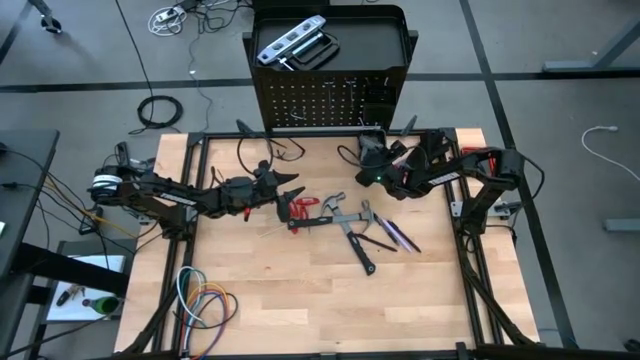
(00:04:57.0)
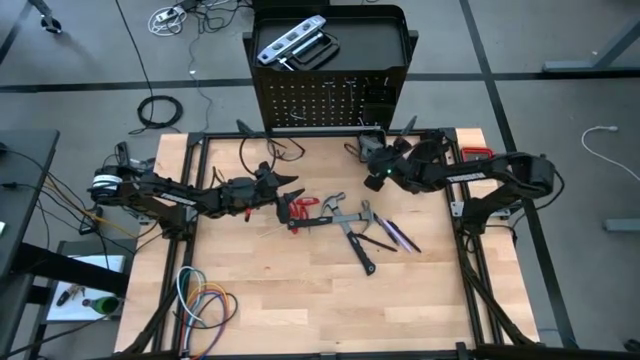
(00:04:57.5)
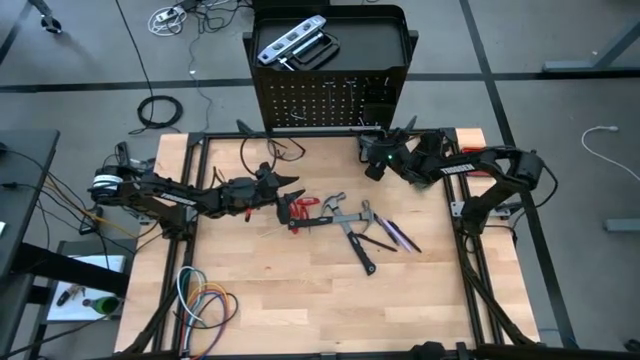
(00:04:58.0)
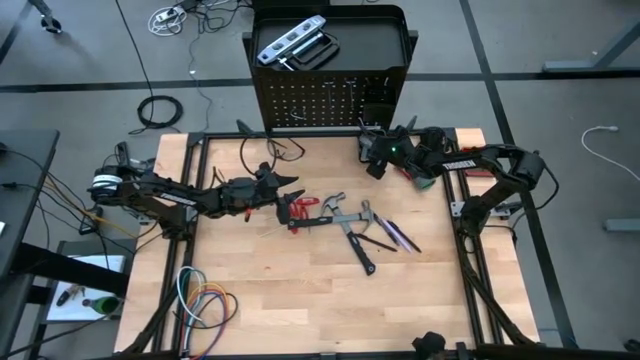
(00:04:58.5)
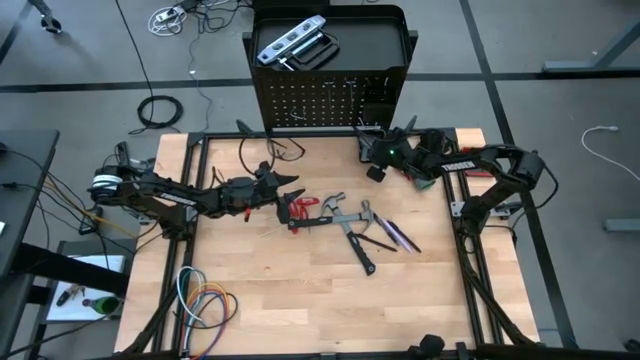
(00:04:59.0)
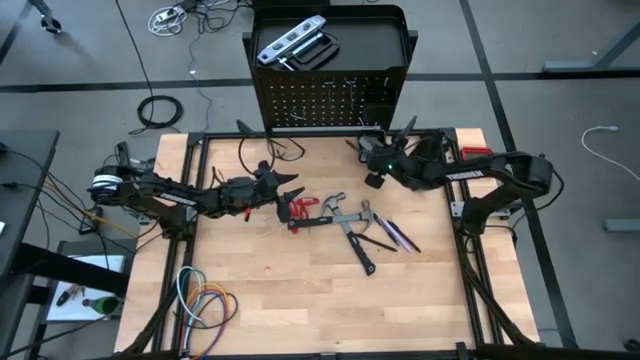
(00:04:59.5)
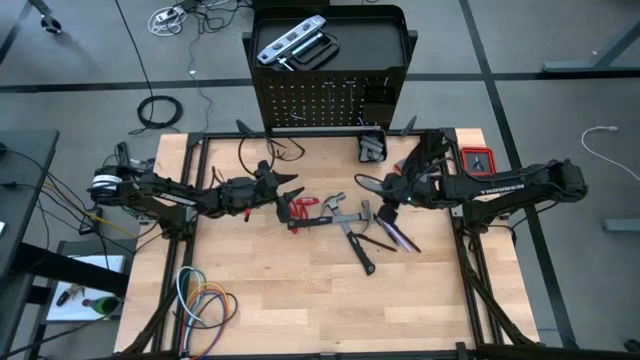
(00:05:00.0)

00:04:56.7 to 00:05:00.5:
Task: Hang tools onto peg board
Remove the terminal block from the bottom basket of the peg board

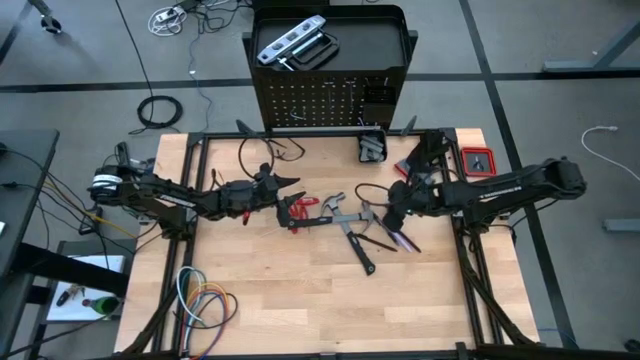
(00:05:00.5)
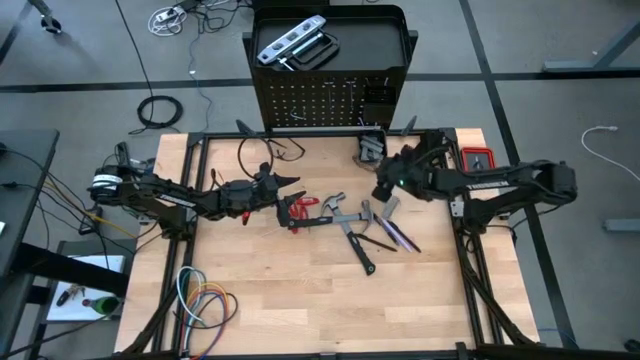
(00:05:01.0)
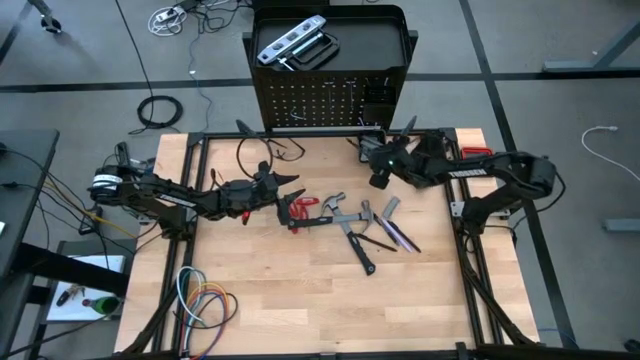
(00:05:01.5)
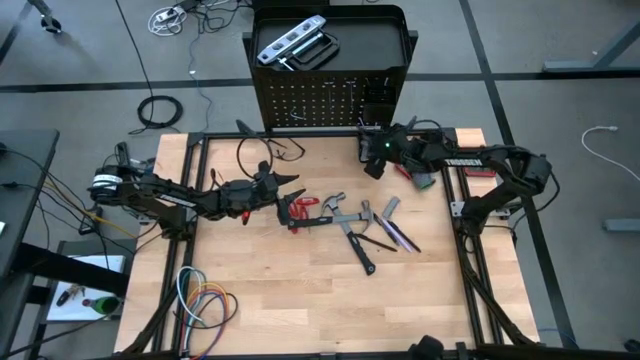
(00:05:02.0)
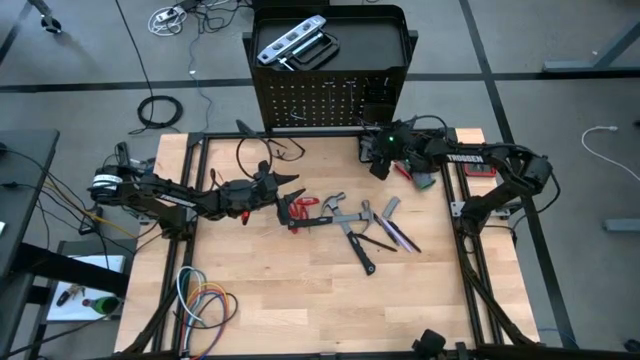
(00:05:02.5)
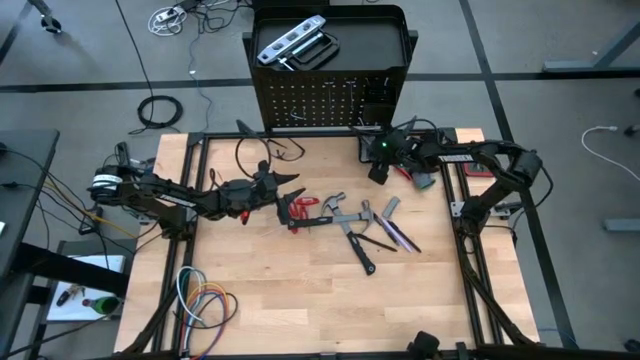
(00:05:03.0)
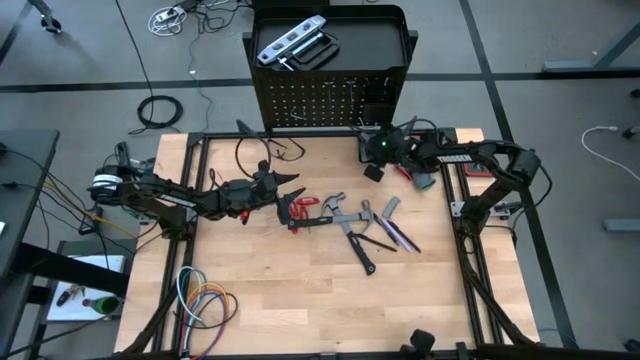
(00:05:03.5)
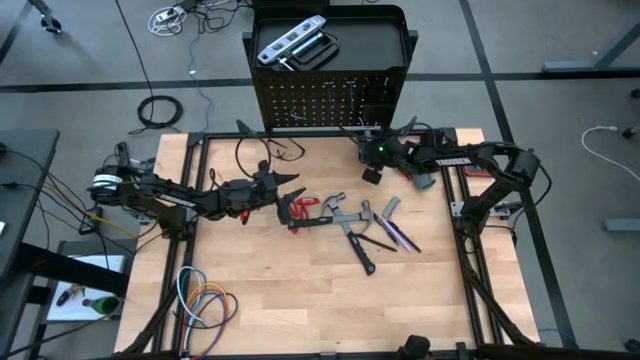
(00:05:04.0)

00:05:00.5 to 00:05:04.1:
Remove the terminal block from the bottom basket of the peg board

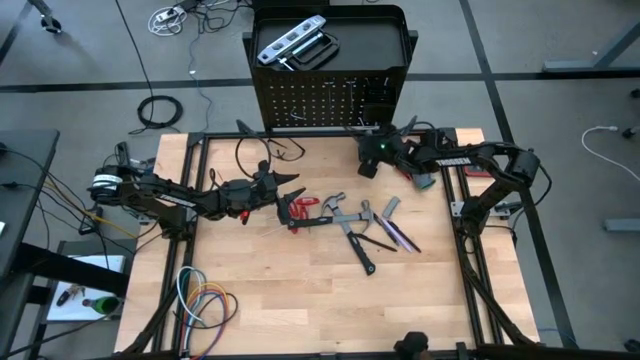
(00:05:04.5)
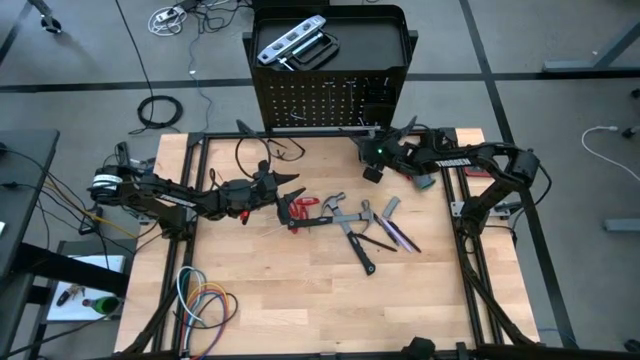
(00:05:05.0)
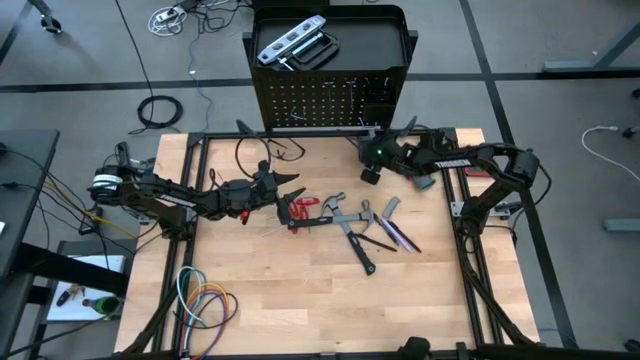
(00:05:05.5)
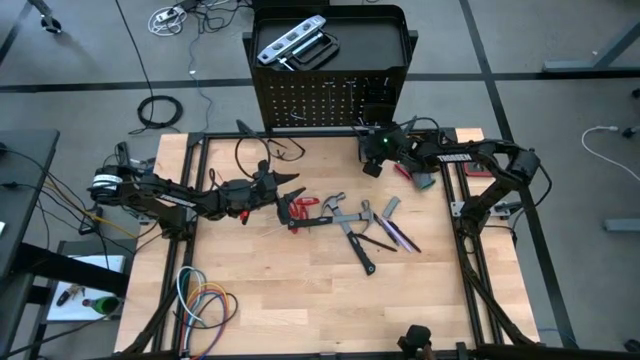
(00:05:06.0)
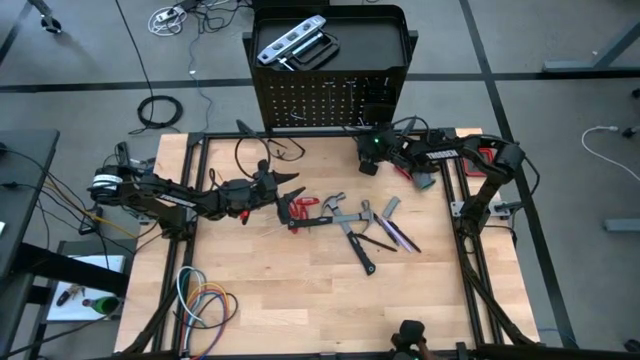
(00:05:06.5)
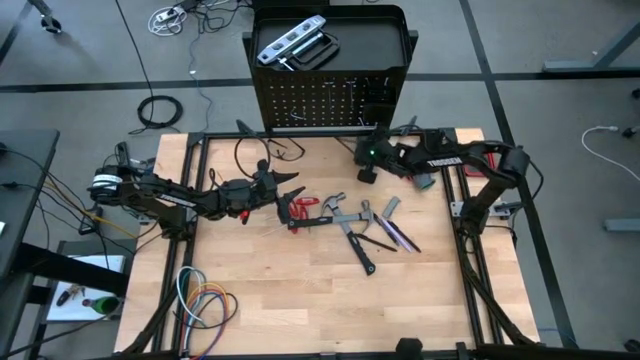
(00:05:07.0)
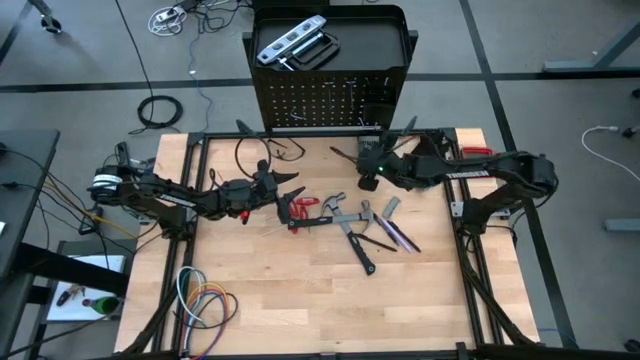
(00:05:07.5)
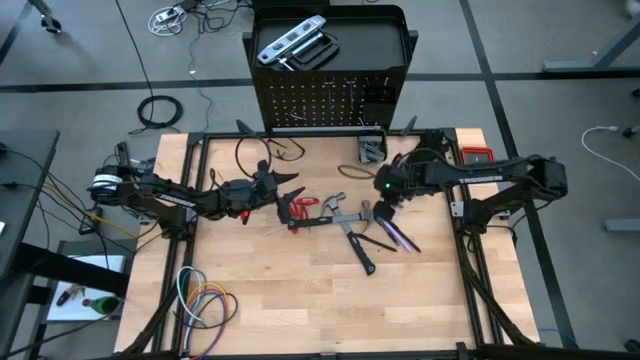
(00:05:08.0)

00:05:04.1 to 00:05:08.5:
Remove the terminal block from the bottom basket of the peg board

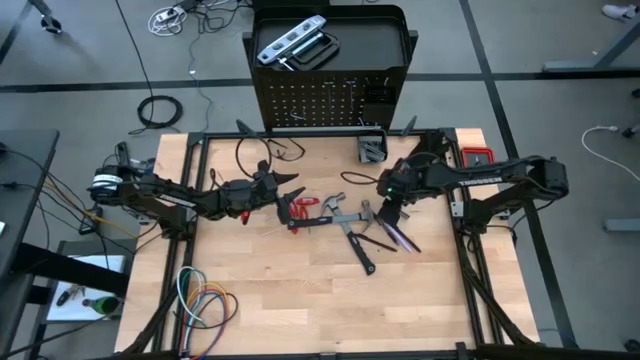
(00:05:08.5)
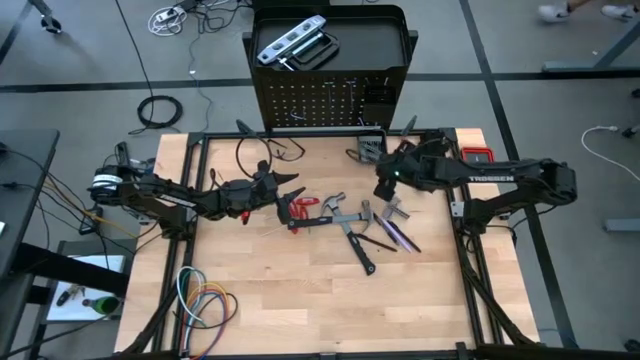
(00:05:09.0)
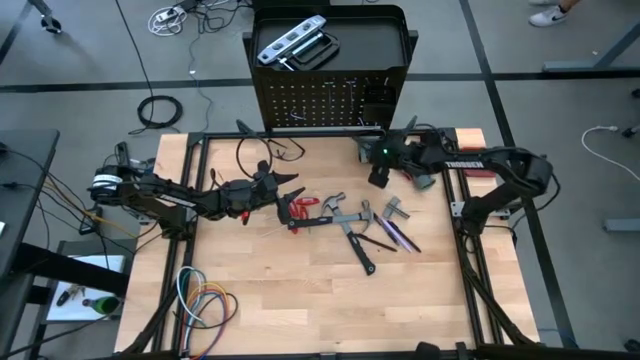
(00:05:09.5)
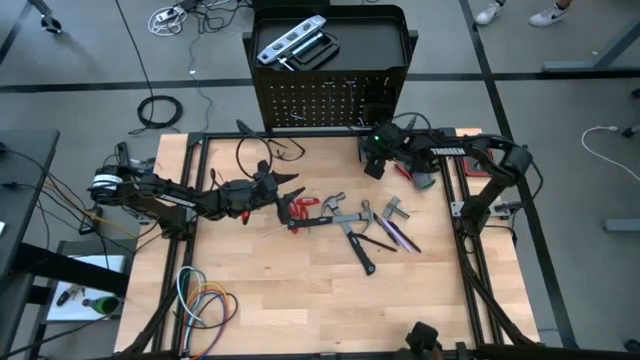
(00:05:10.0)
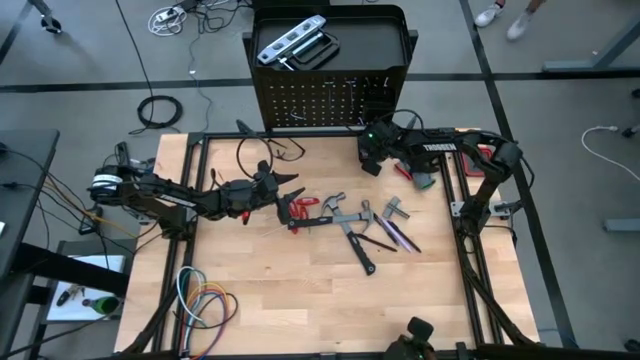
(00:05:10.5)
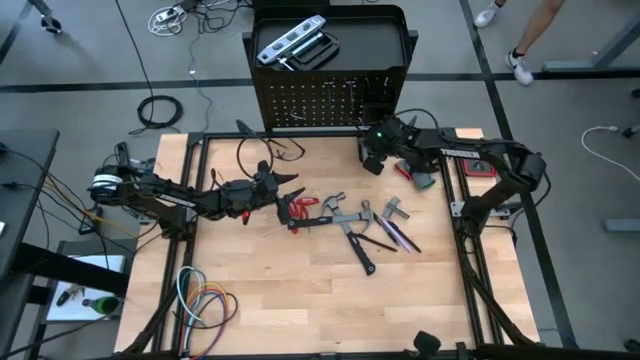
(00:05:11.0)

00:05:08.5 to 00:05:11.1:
Remove the terminal block from the bottom basket of the peg board

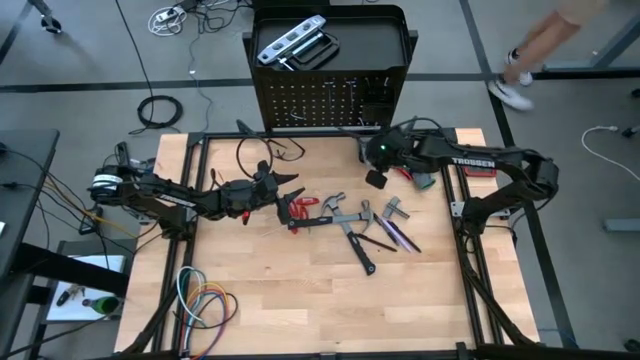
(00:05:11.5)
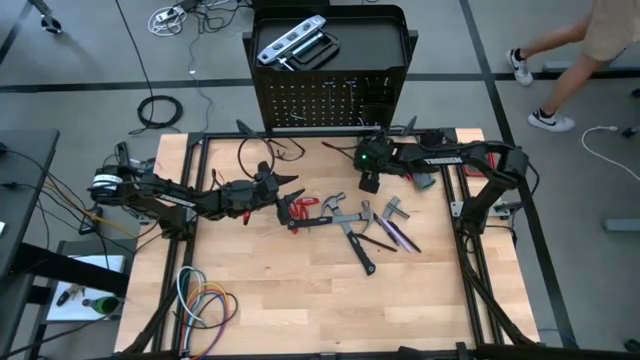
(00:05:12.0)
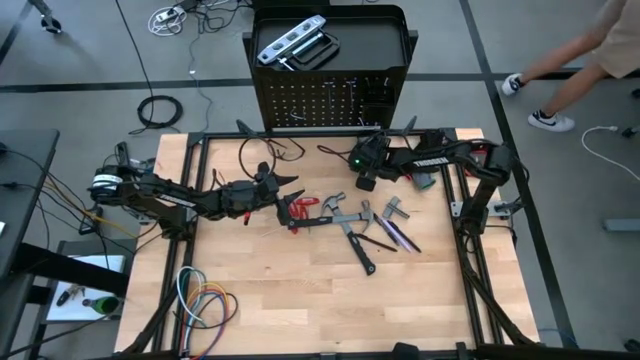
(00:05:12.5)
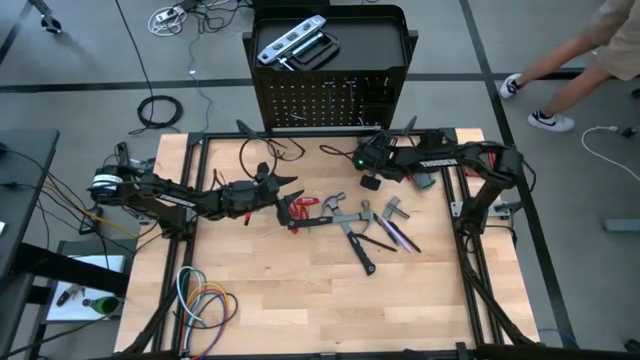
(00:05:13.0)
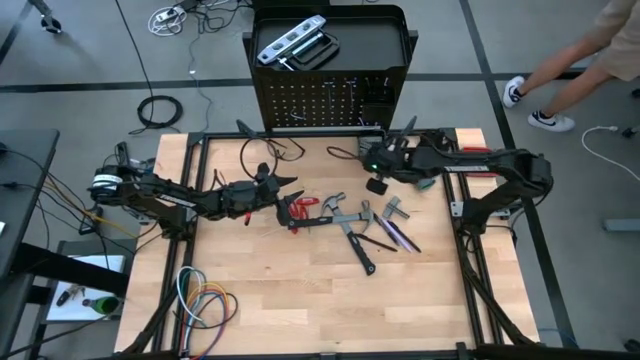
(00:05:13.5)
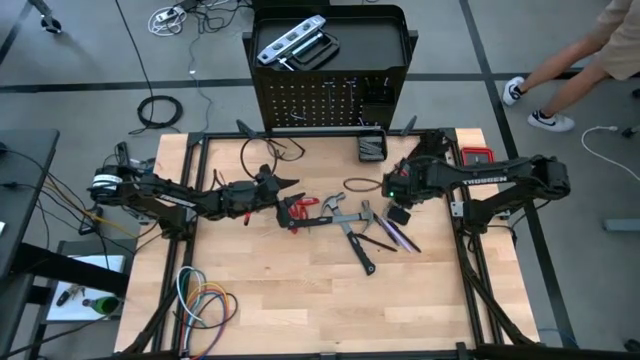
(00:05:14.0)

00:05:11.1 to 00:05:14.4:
Remove the terminal block from the bottom basket of the peg board

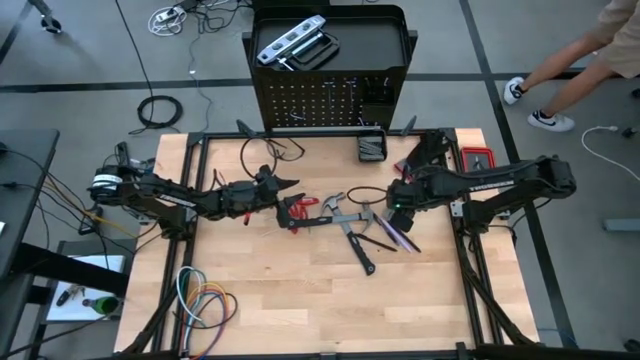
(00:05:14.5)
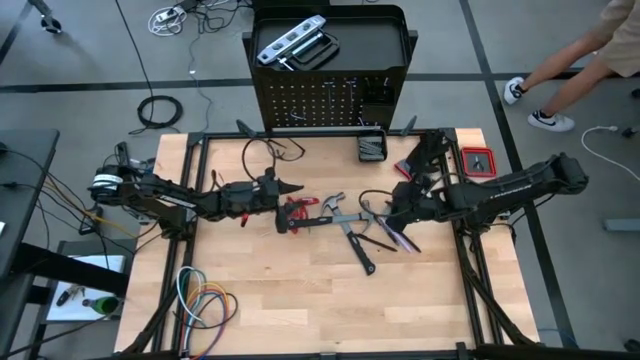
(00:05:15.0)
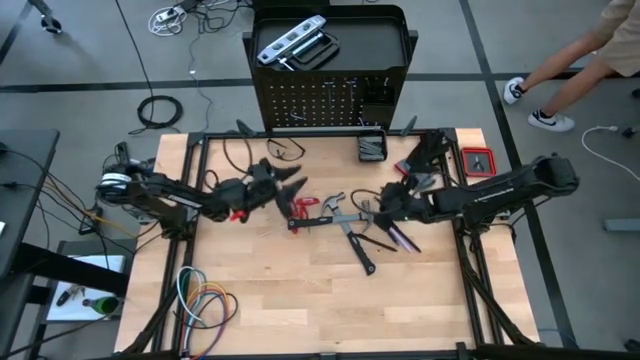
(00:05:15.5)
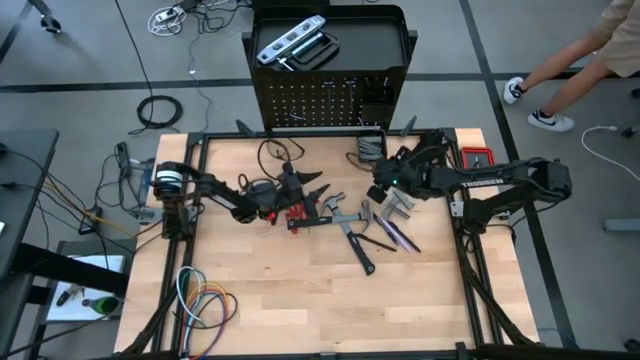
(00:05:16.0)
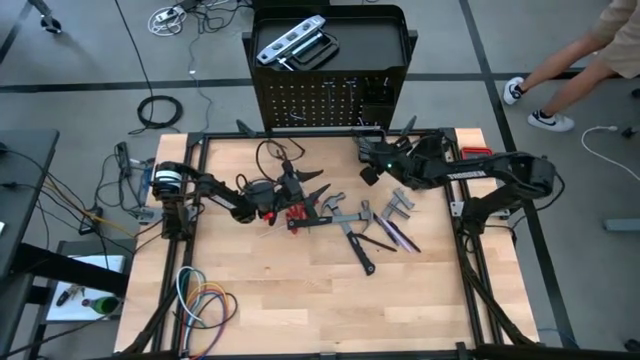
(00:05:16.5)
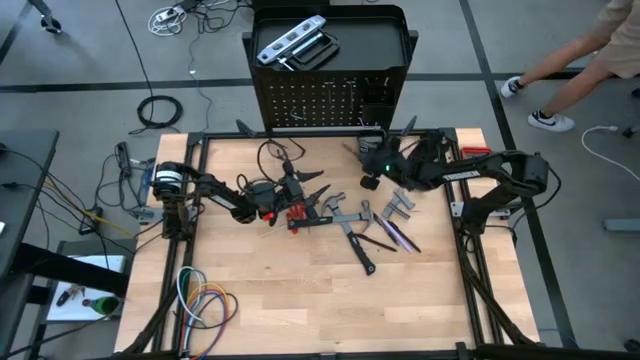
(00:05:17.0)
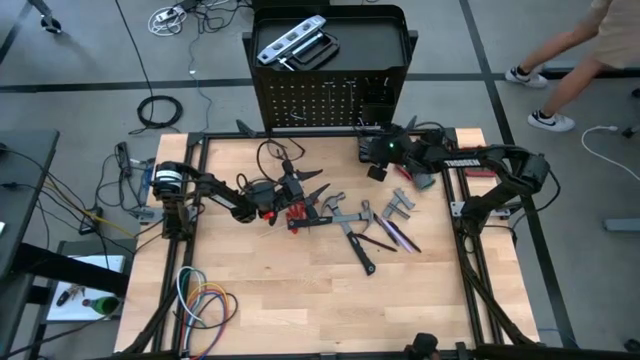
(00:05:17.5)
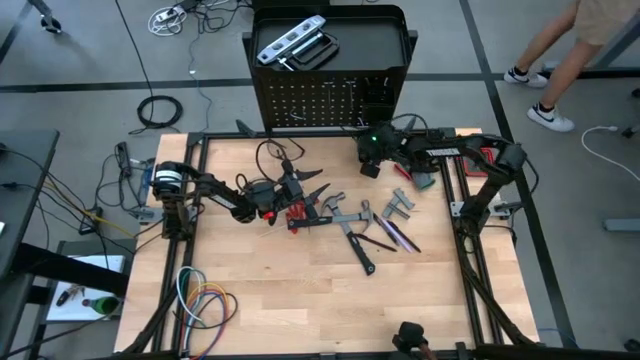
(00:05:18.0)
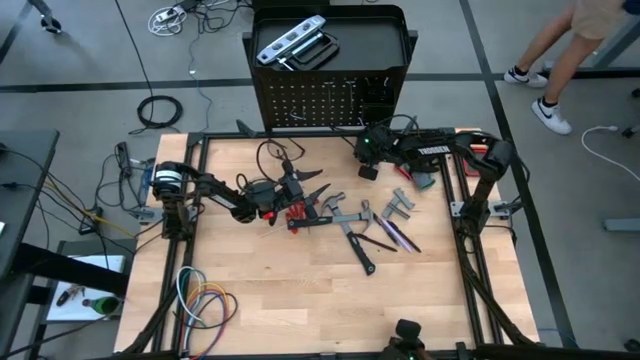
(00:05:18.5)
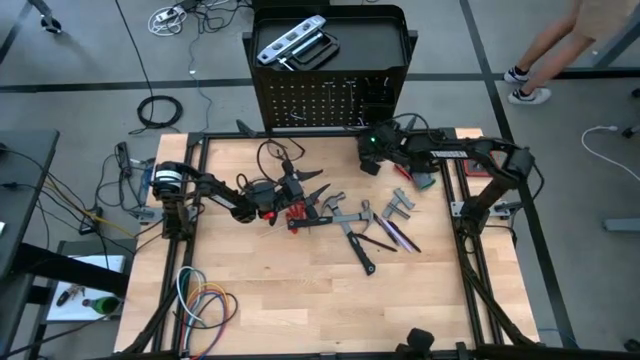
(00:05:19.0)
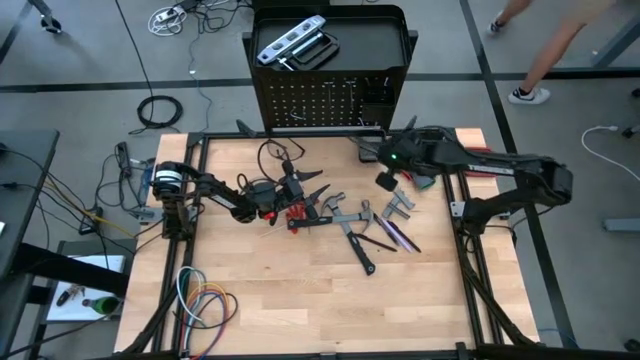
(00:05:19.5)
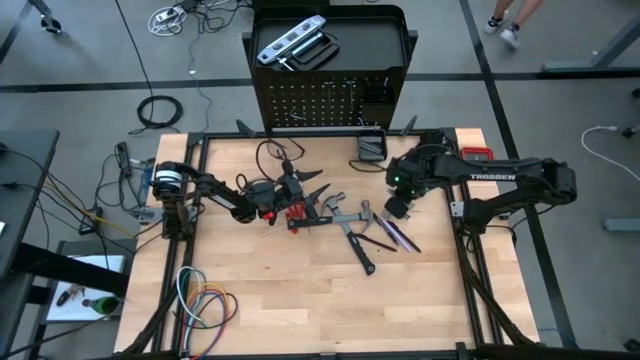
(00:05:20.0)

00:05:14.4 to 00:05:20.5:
Remove the terminal block from the bottom basket of the peg board
